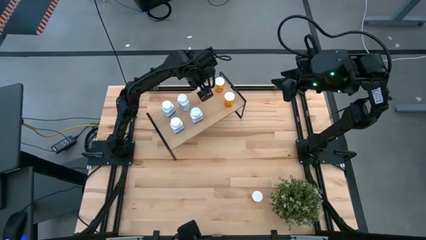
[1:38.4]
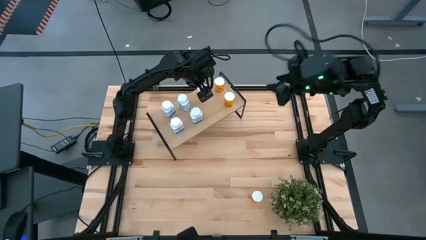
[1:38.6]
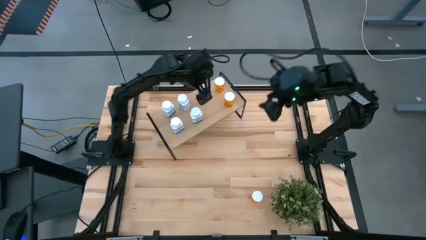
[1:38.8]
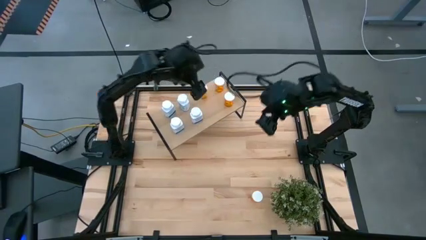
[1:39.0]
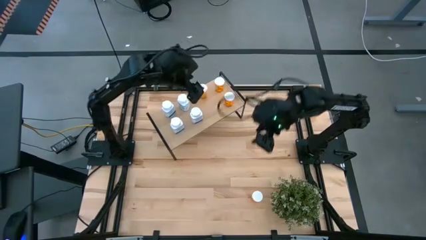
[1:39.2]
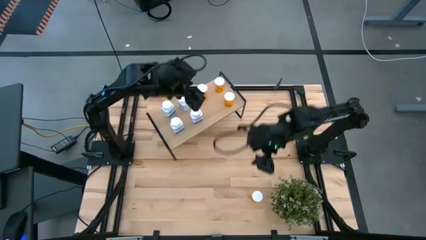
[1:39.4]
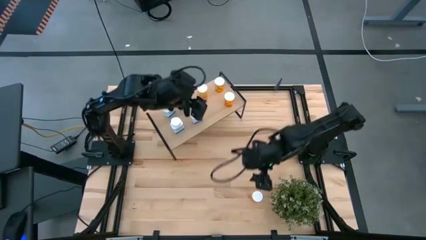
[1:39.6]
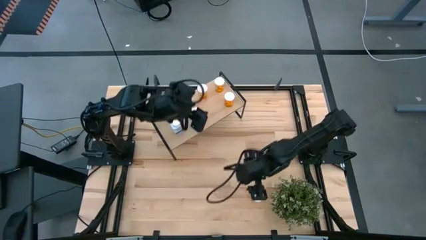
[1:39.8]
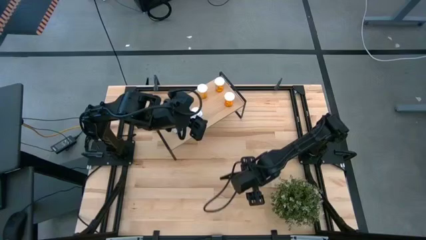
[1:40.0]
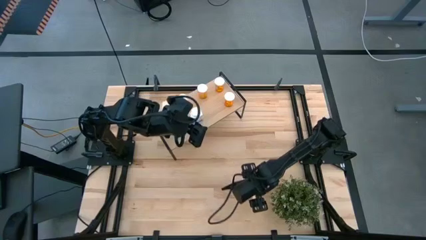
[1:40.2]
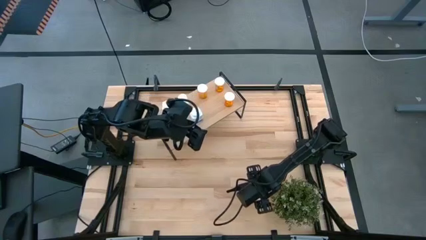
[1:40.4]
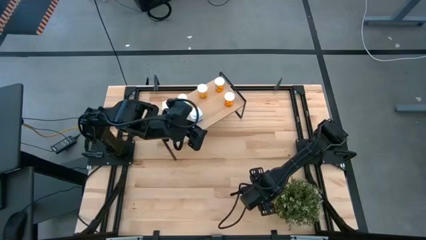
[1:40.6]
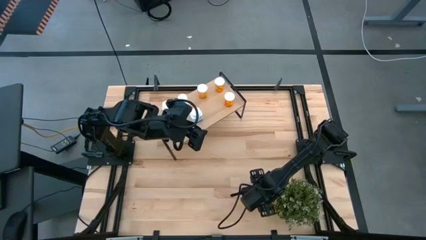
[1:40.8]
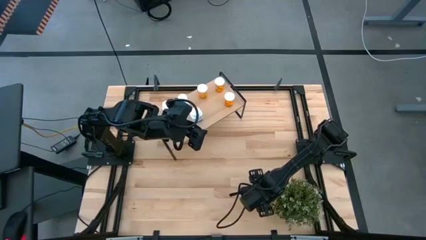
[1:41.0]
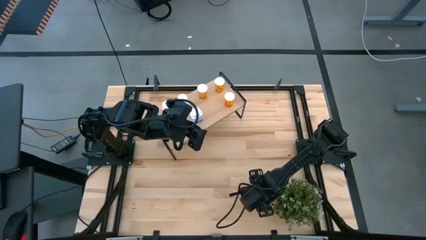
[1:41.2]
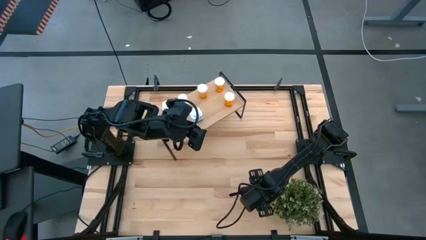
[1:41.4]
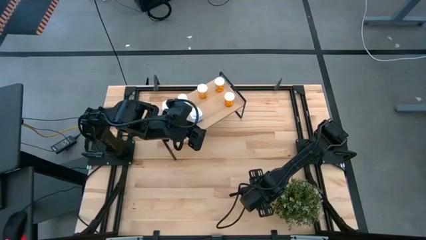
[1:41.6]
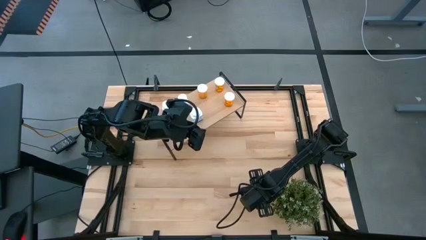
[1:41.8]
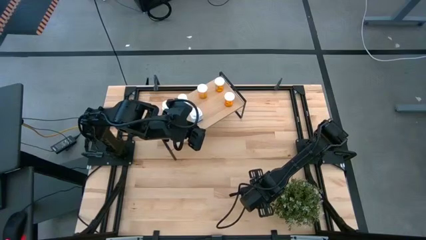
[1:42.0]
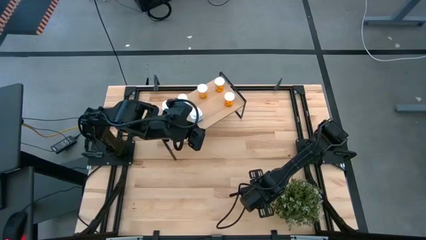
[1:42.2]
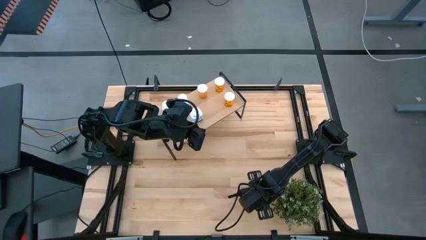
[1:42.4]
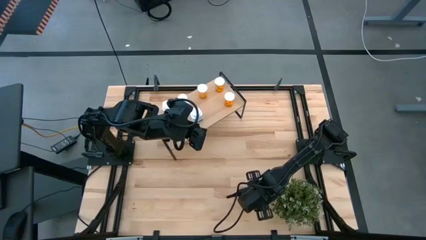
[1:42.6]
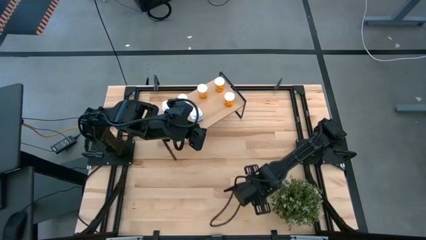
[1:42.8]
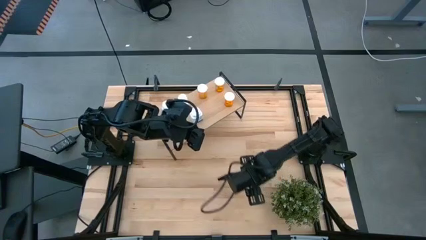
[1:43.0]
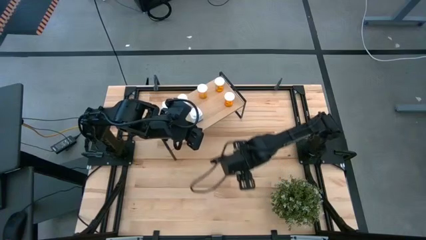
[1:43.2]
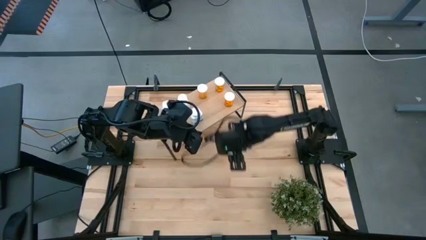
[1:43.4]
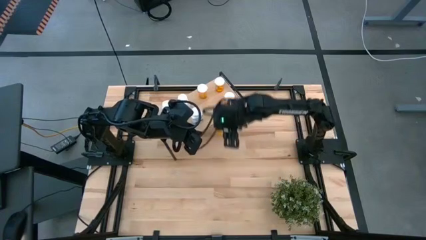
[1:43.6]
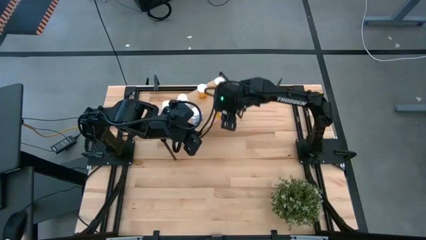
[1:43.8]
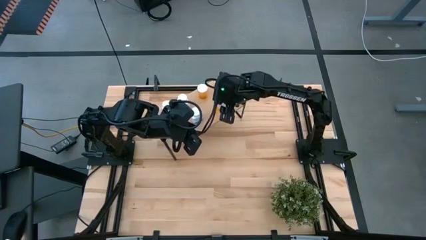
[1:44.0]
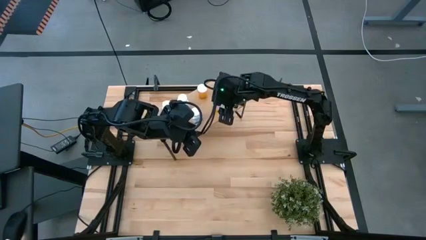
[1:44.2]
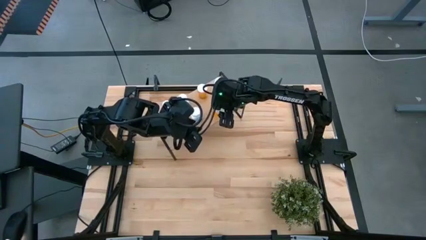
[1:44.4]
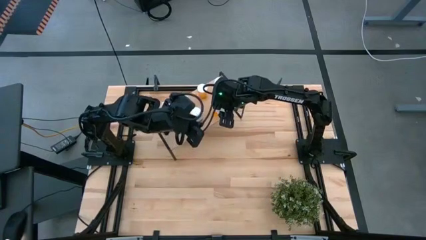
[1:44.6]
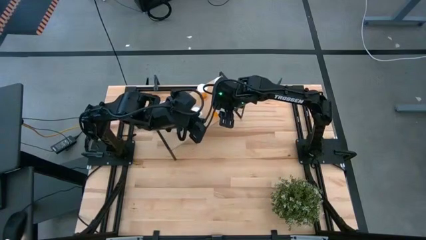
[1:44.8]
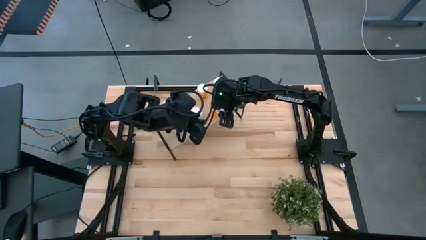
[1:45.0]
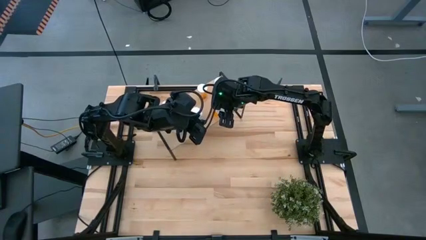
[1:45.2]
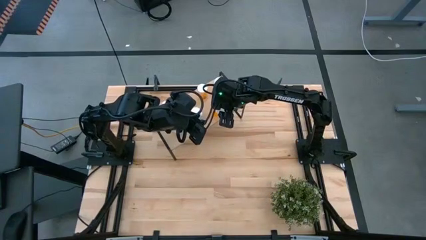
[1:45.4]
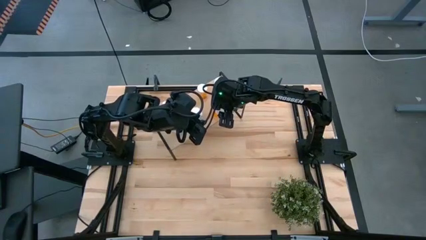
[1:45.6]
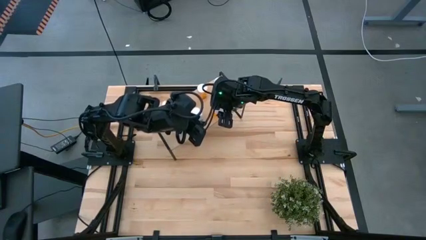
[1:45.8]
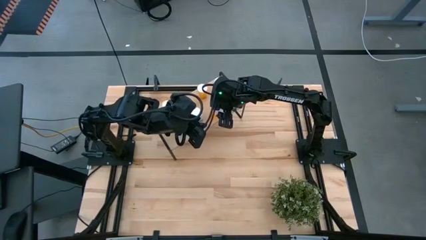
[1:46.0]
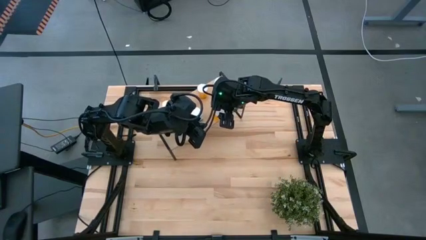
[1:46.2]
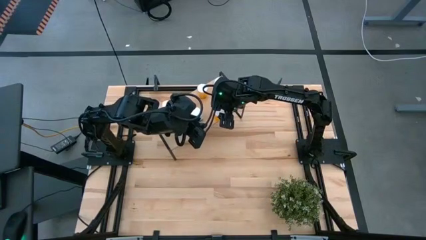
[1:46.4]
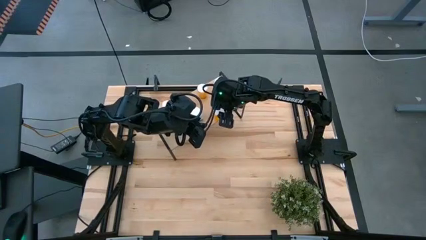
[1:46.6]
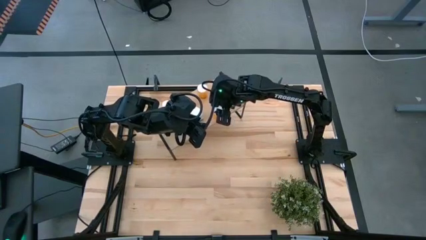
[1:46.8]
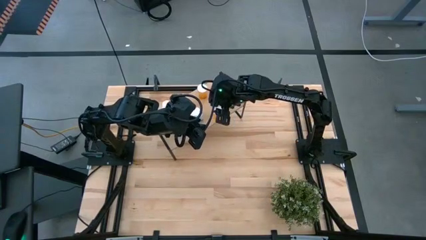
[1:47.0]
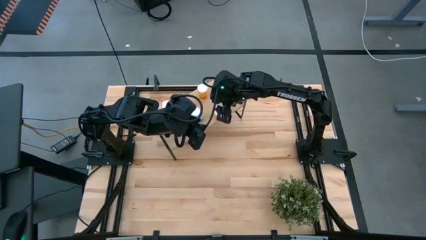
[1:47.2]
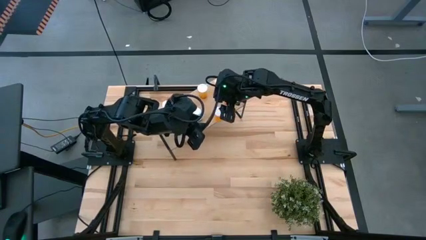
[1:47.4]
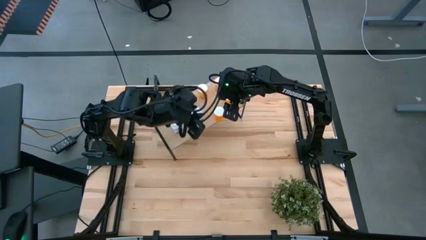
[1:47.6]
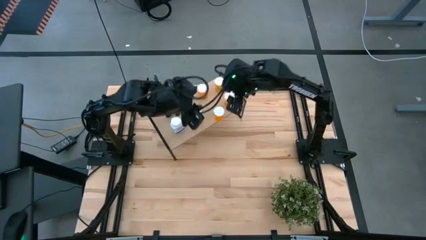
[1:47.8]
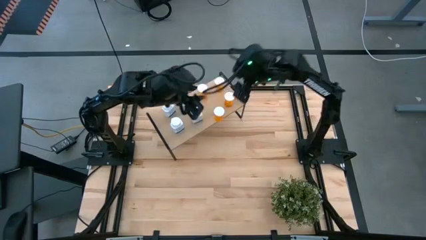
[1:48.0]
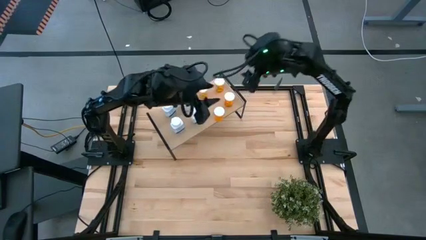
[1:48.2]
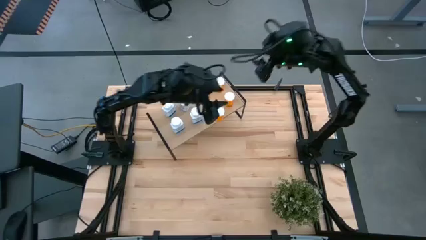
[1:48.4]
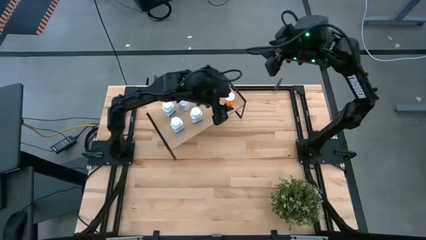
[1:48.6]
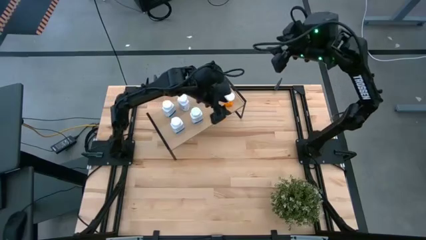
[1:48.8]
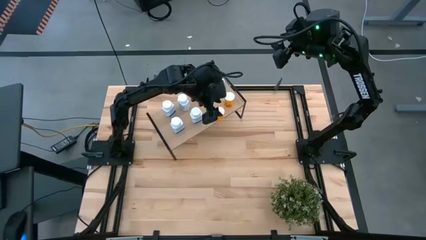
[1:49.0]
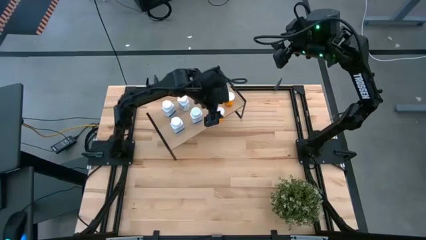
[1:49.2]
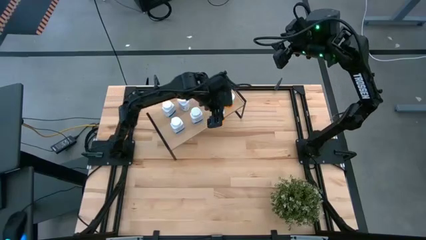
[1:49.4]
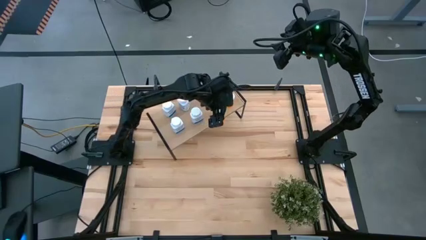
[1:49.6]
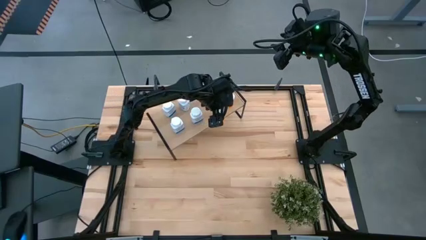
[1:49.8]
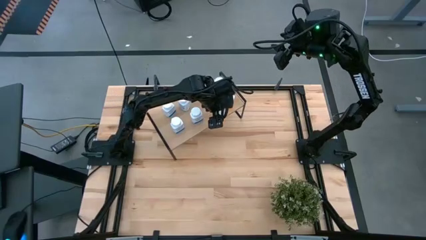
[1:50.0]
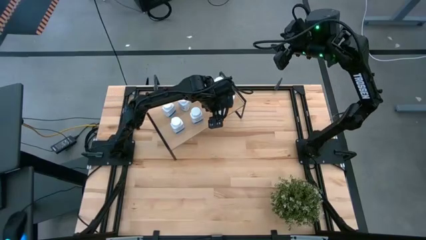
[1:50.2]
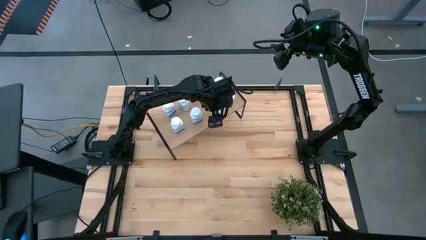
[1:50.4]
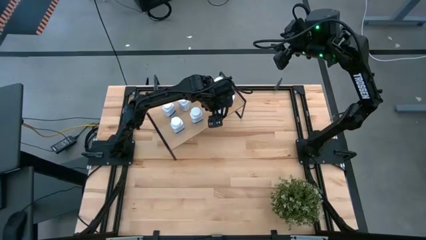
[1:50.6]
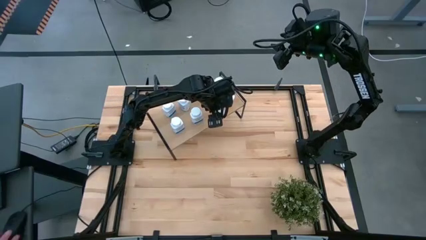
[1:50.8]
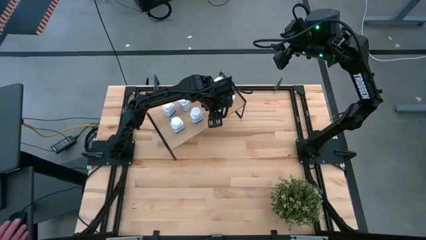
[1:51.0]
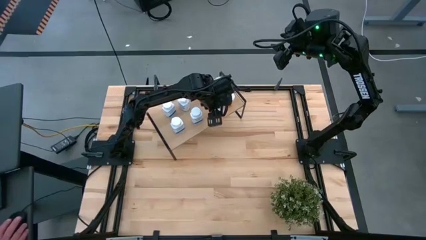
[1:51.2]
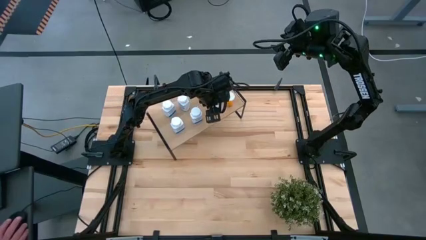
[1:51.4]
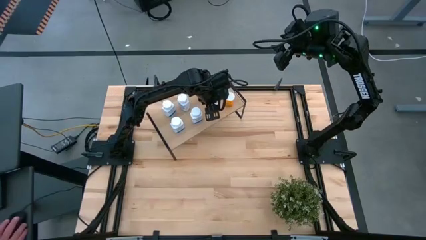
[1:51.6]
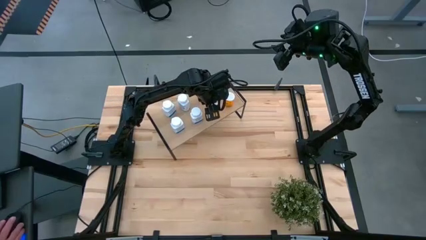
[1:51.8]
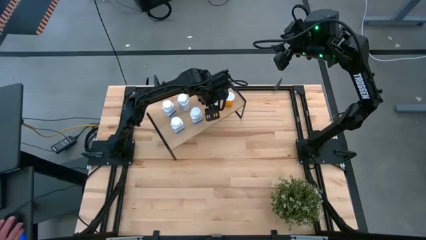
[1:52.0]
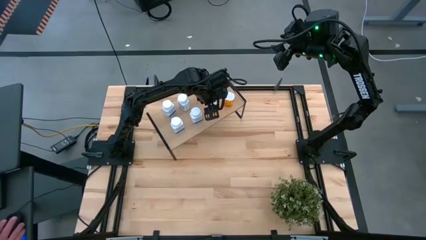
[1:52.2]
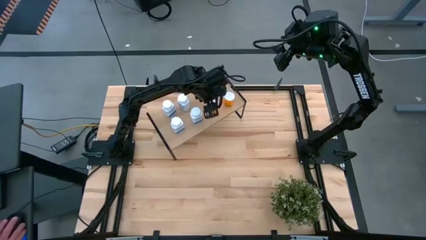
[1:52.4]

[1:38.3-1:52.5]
Task: Pick and place medicine bottles onto shelf by color
Put the orange pill bottle on the shelf aligned with the other orange pill bottle
